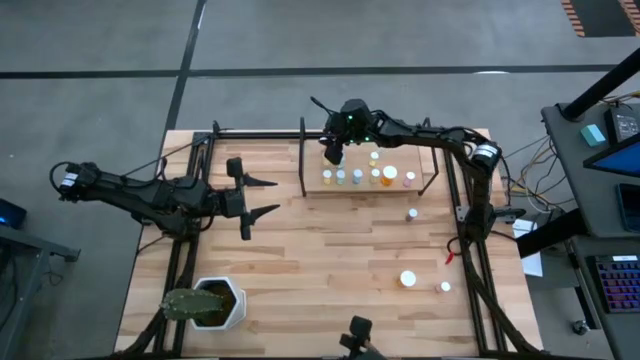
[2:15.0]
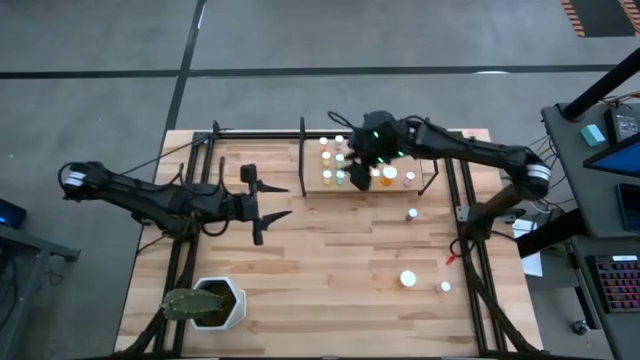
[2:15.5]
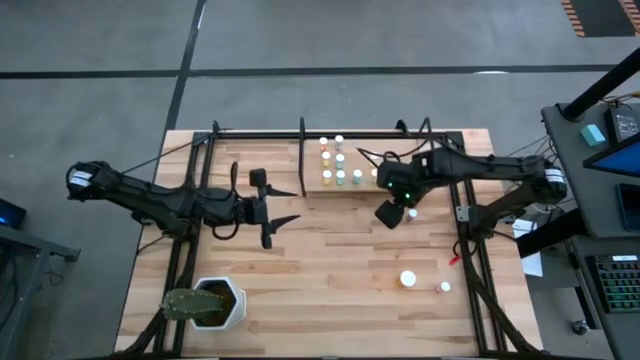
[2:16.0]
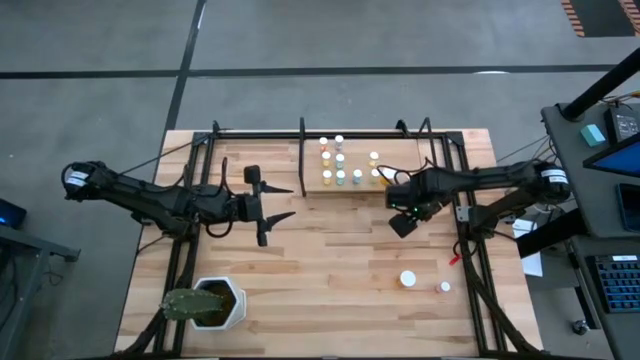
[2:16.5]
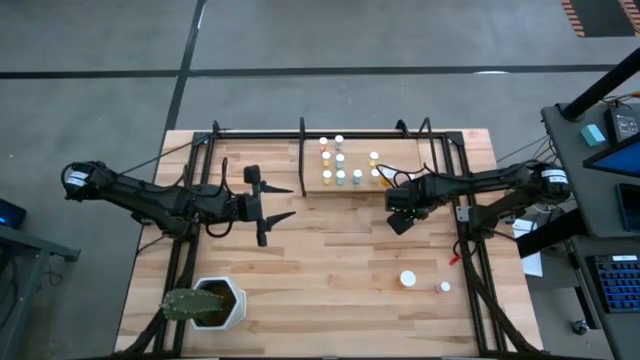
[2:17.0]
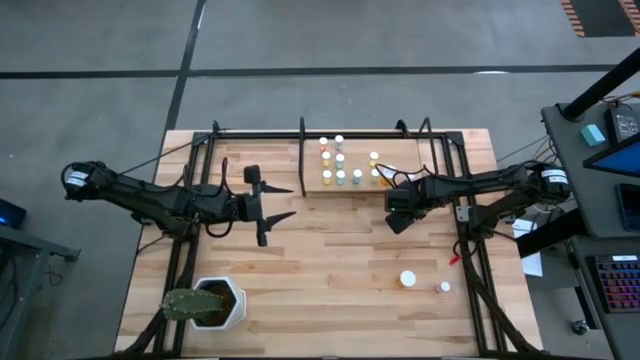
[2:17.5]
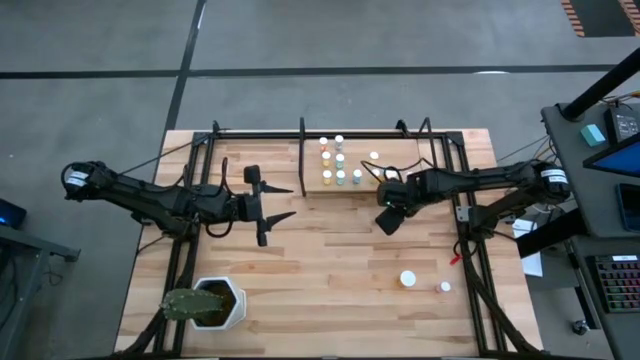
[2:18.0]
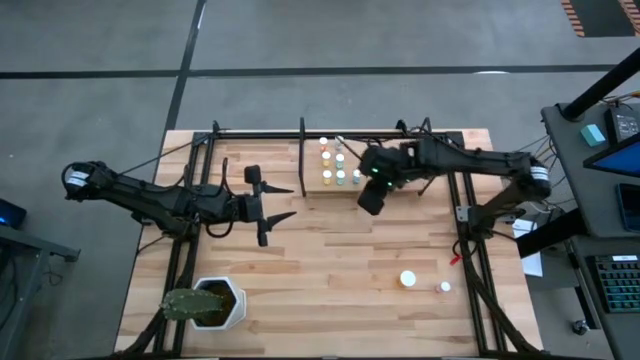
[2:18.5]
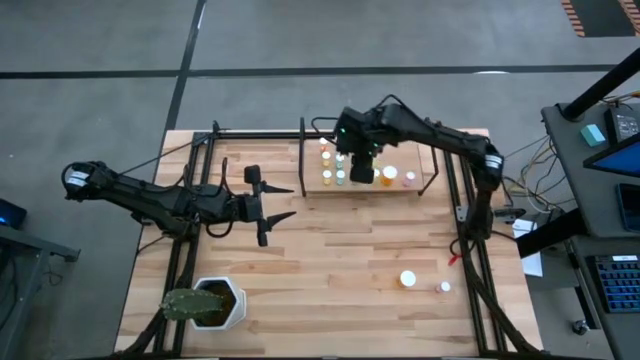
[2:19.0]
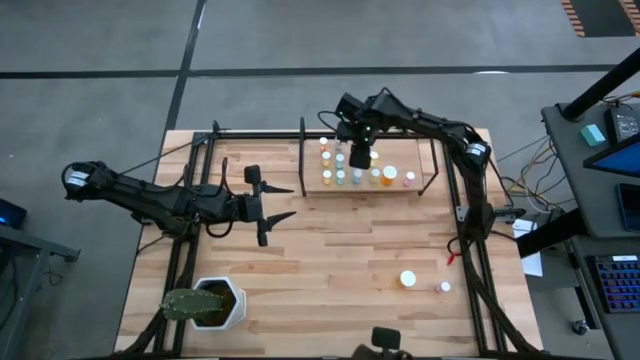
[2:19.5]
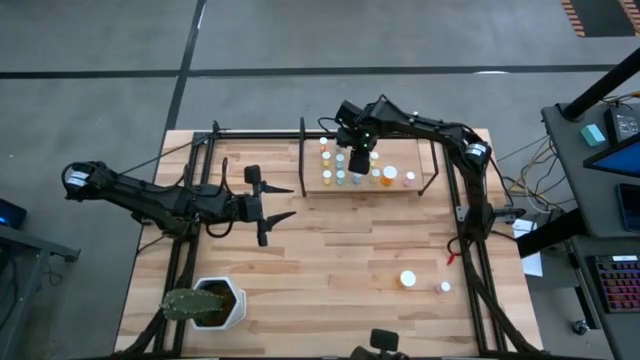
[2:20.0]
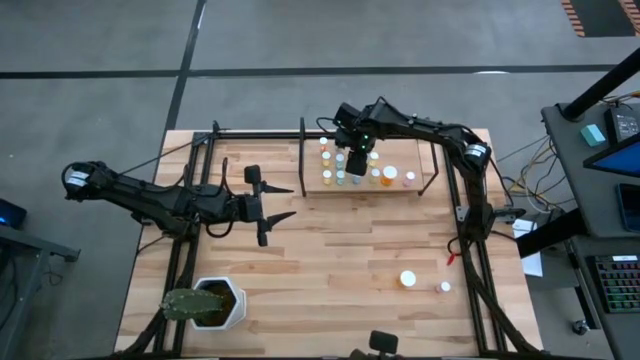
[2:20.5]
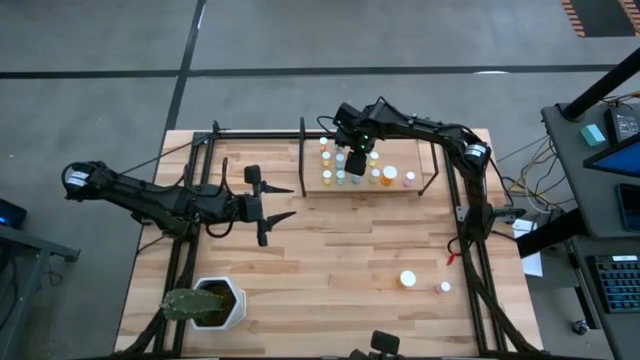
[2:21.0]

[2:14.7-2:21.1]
Task: Pick and place medicine bottles onto shelf by color
Put the blue pill bottle on the shelf aligned with the other blue pill bottle

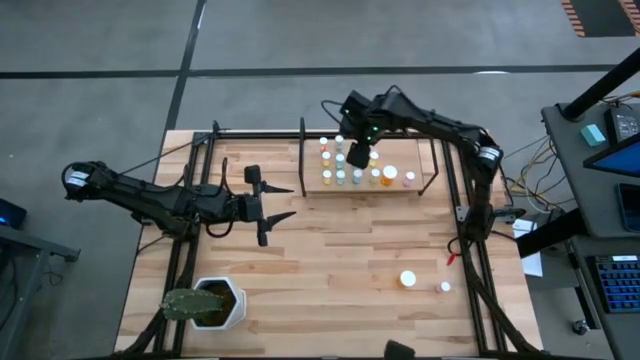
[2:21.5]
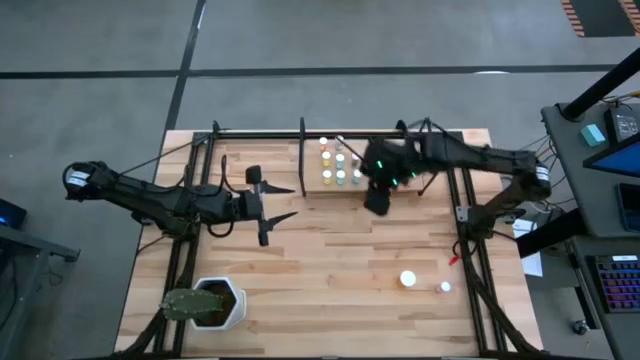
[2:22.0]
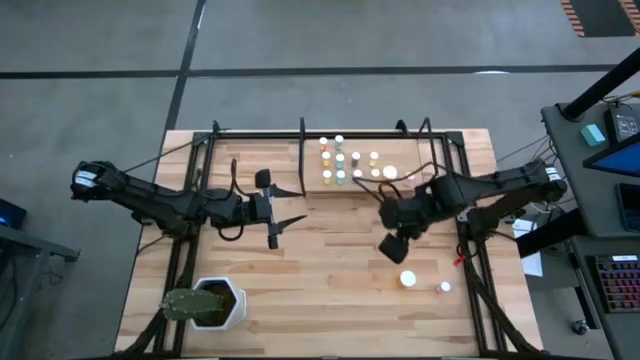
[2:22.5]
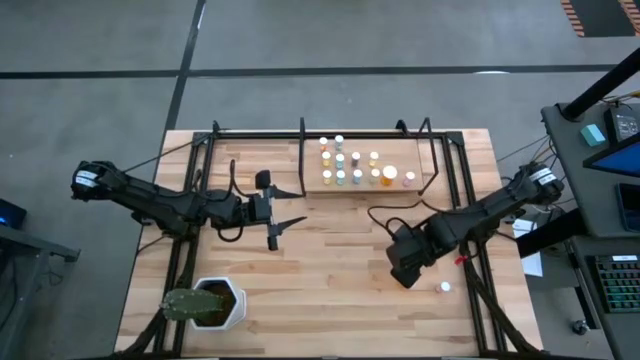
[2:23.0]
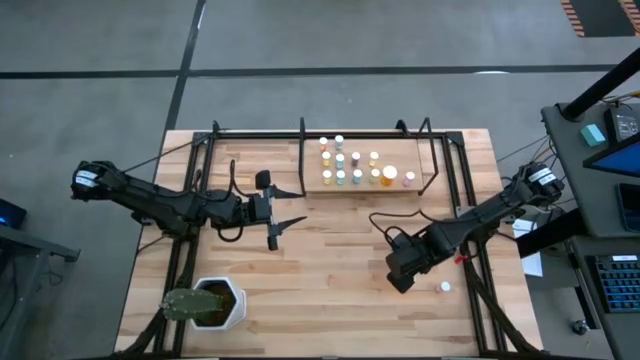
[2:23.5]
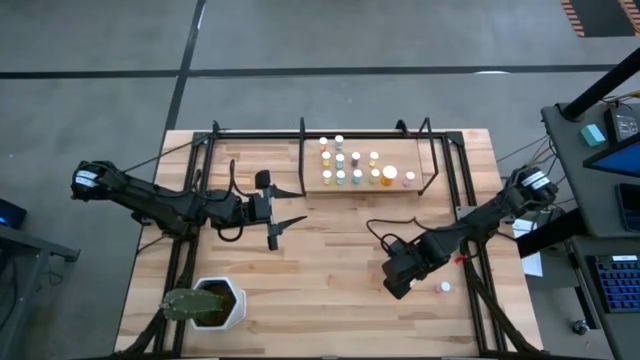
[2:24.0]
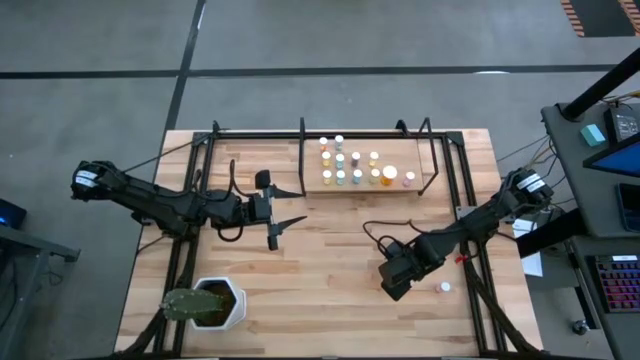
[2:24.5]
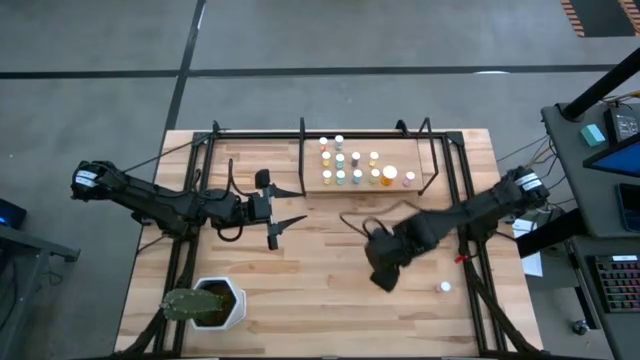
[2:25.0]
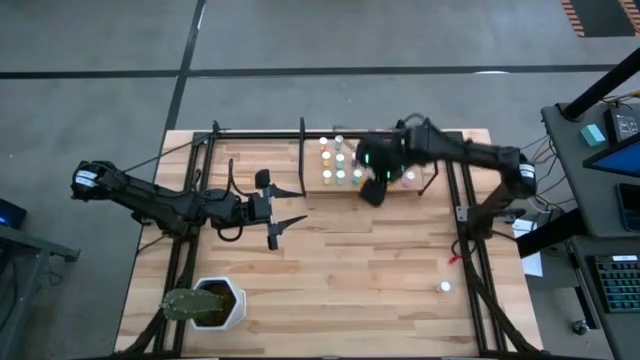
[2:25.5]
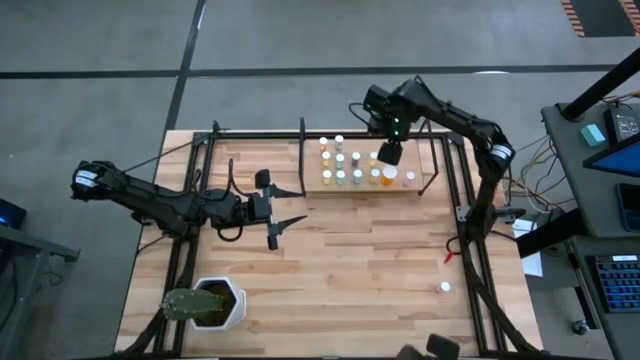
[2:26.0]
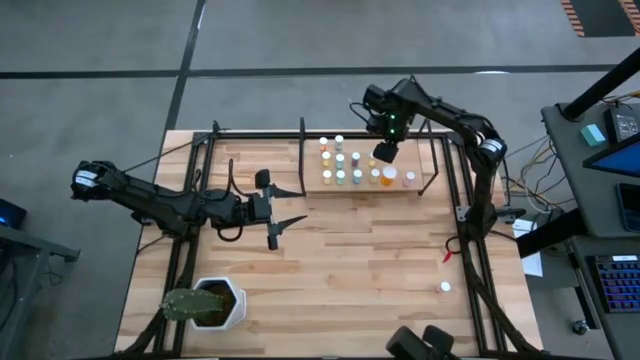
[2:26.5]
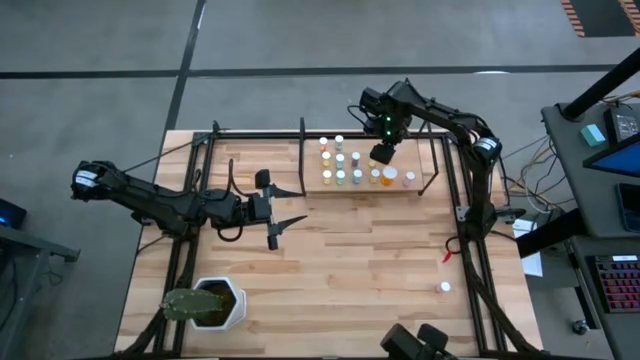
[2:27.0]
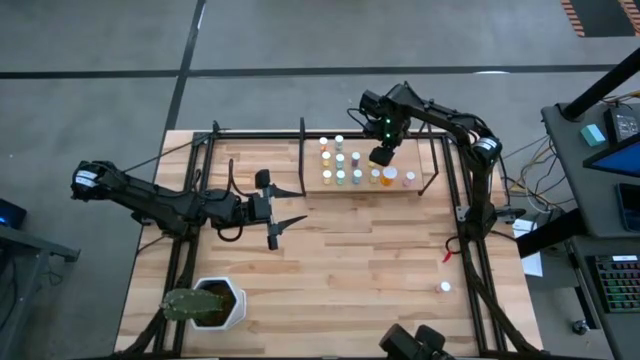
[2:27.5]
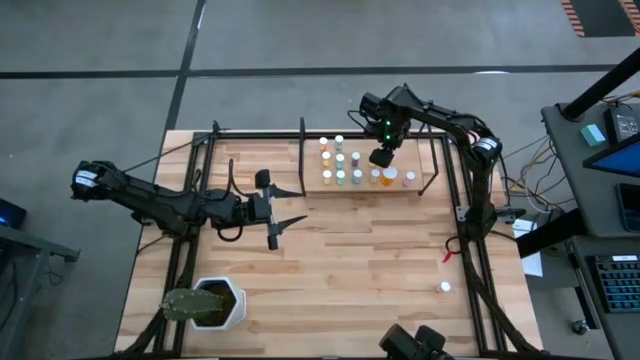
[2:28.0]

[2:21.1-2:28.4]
Put the orange pill bottle on the shelf aligned with the other orange pill bottle

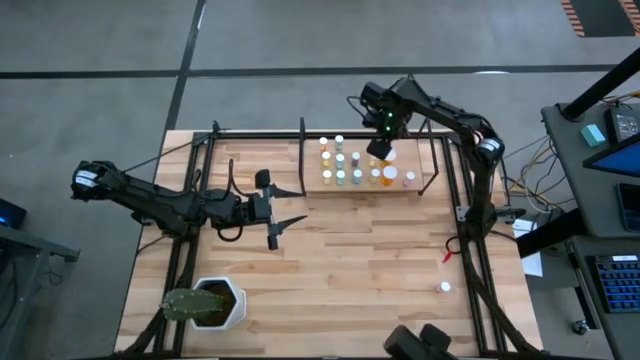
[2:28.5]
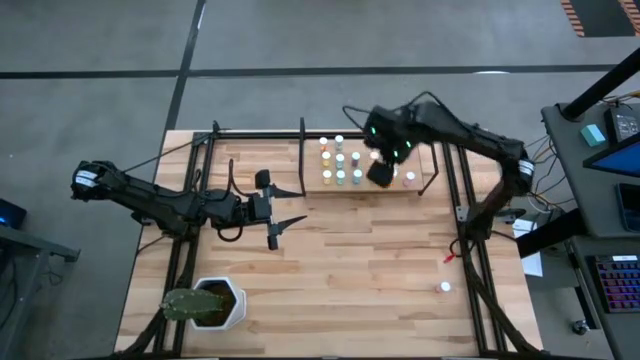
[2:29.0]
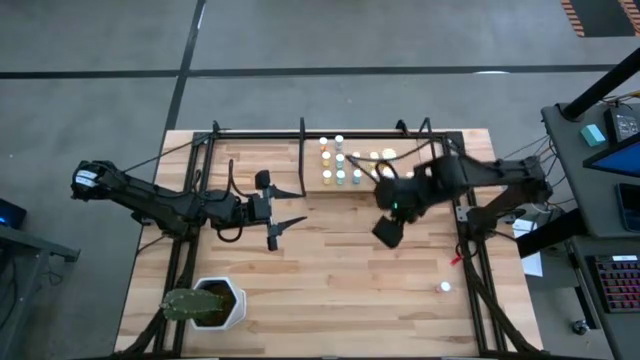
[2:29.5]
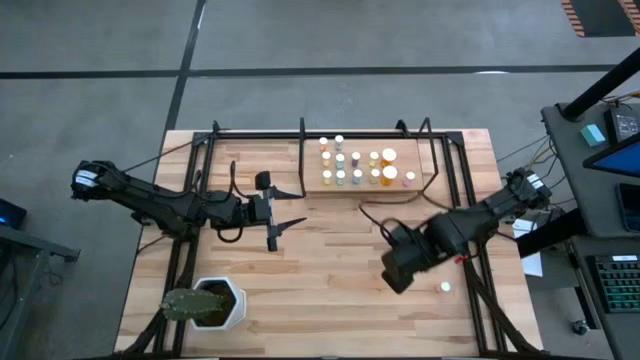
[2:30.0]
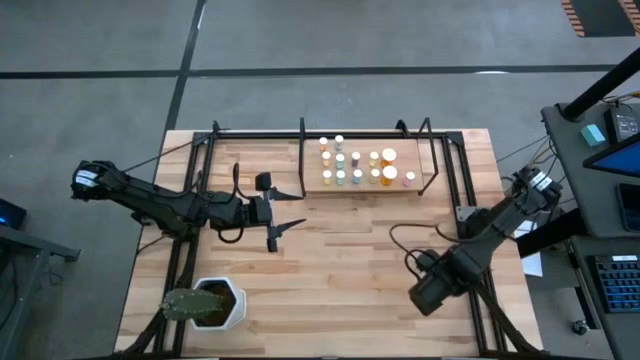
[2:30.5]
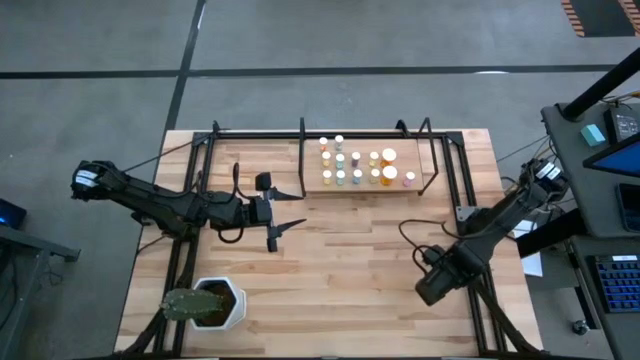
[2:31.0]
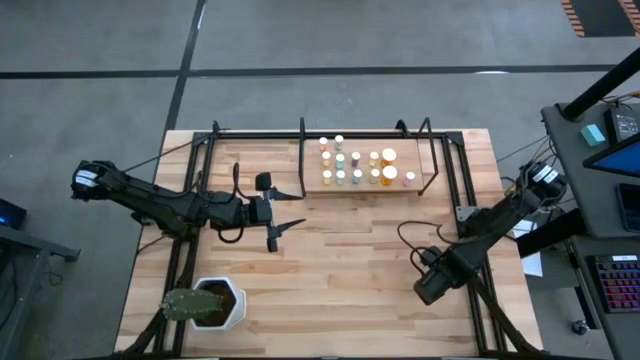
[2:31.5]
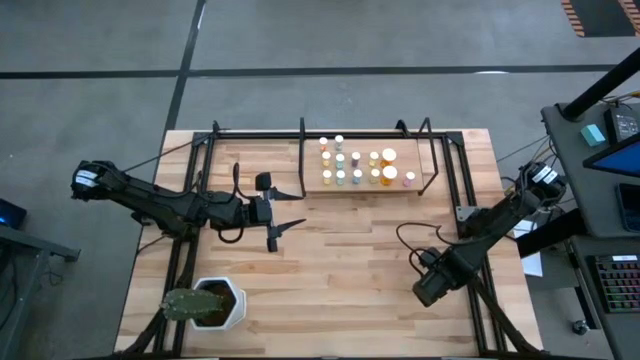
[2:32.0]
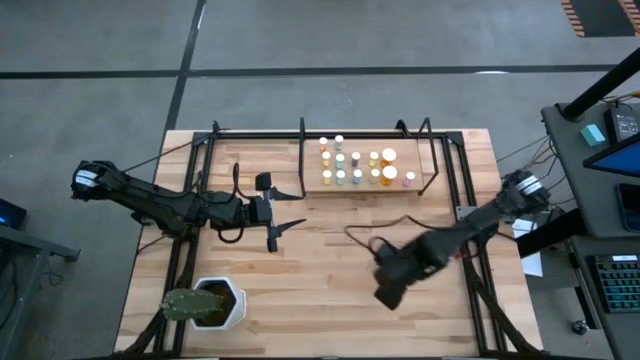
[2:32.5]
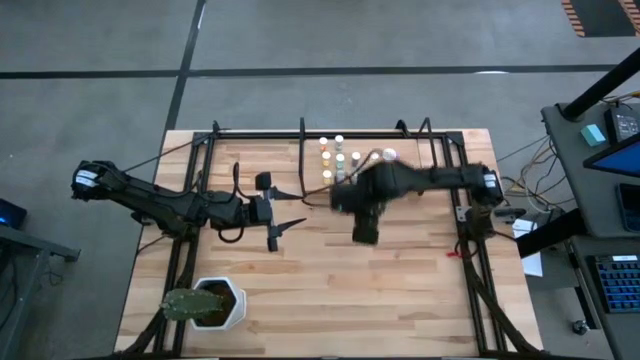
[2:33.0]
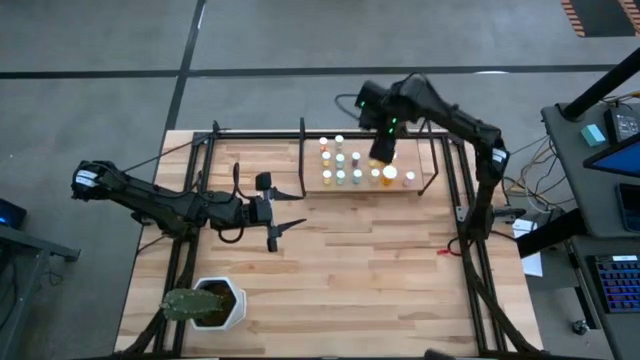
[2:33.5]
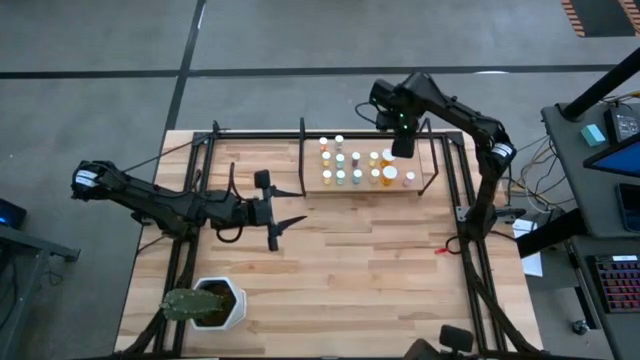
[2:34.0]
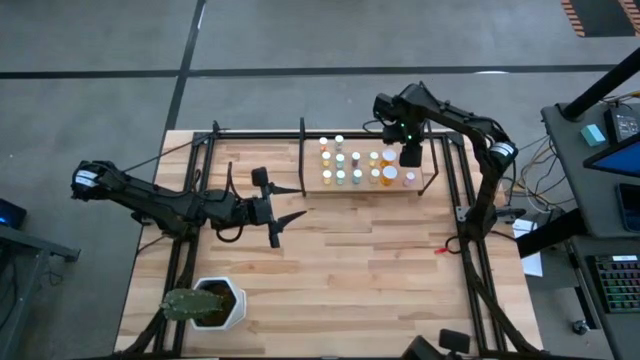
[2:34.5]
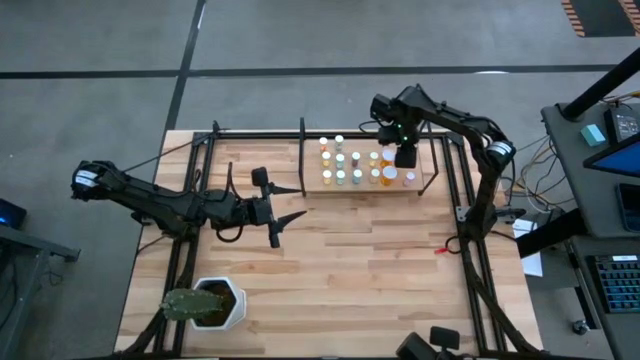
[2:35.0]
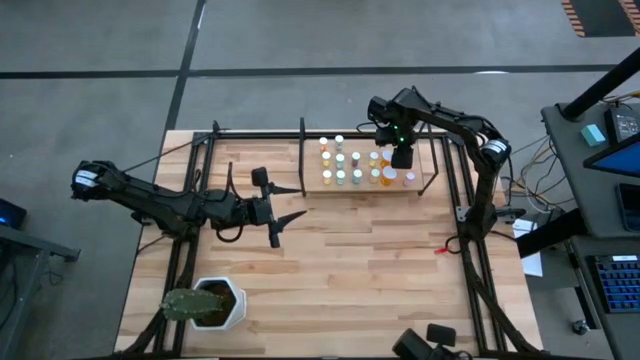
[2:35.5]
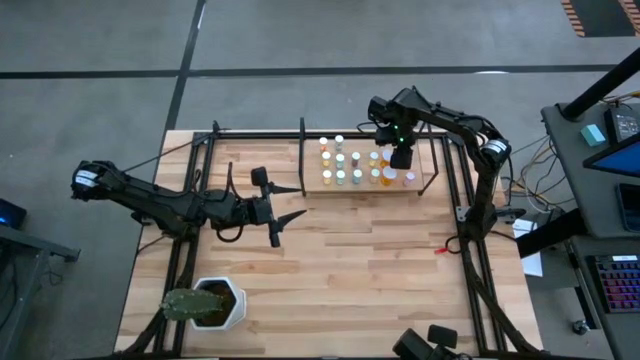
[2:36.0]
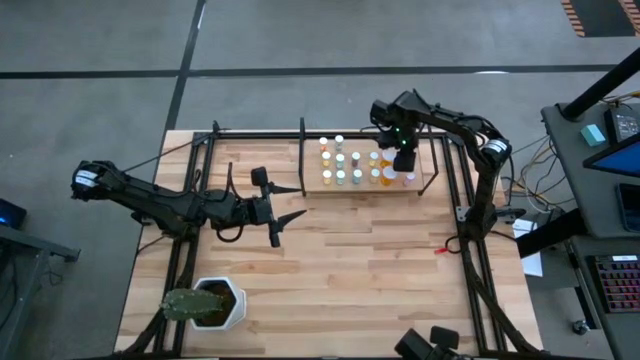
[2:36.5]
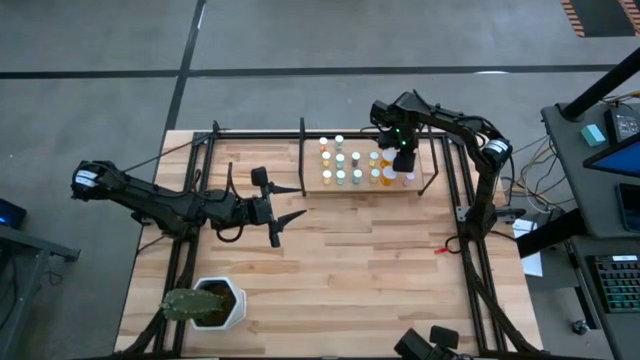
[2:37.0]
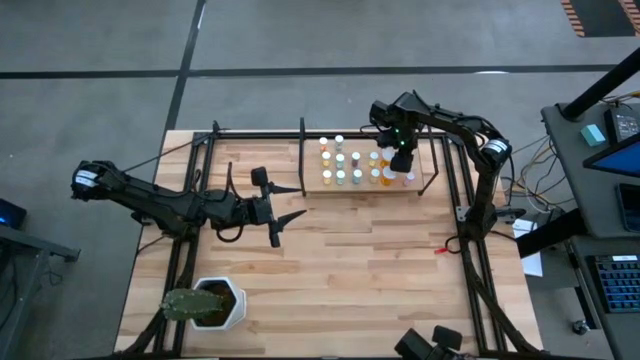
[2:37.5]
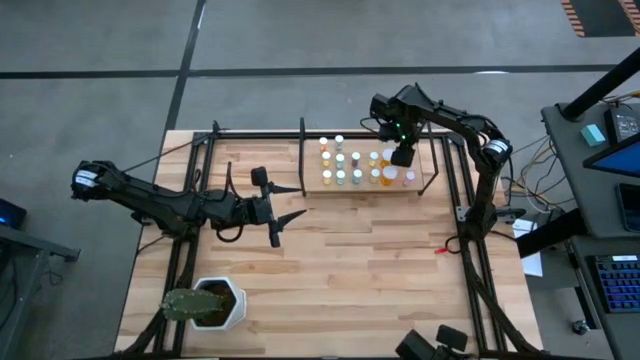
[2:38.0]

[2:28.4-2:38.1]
Put the pink pill bottle on the shelf aligned with the other pink pill bottle
